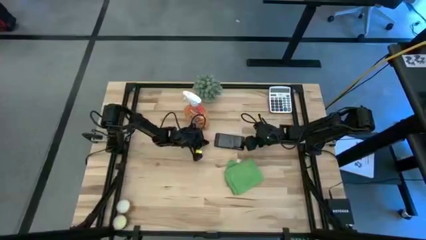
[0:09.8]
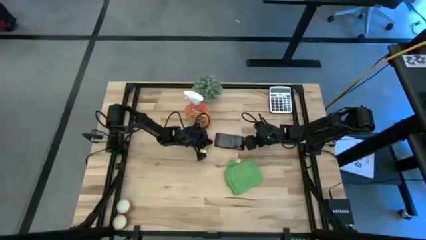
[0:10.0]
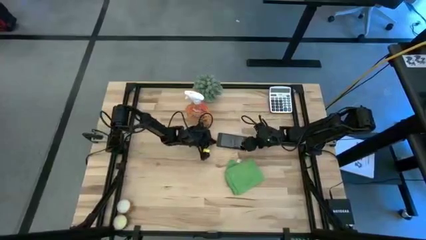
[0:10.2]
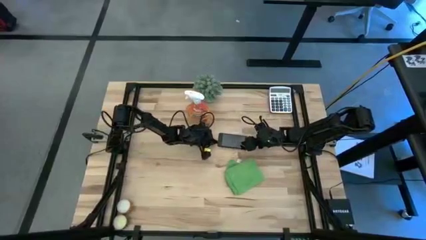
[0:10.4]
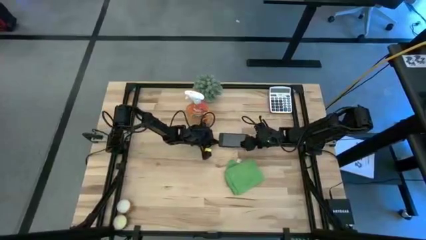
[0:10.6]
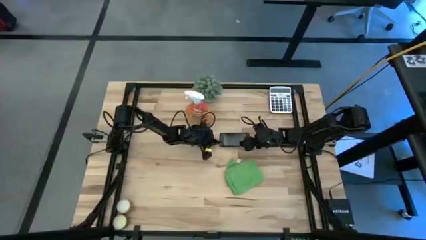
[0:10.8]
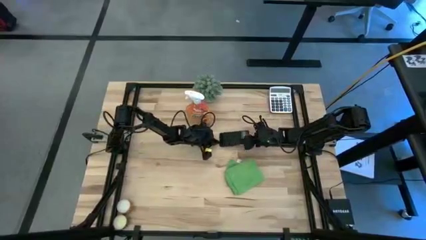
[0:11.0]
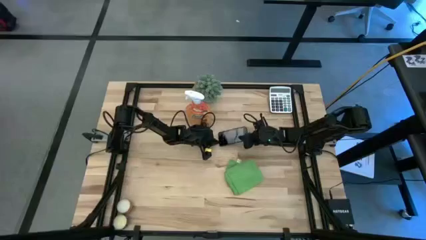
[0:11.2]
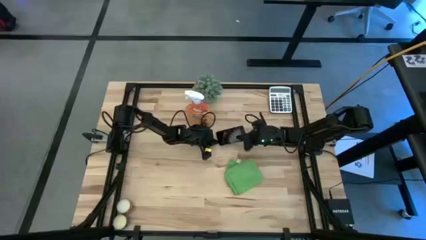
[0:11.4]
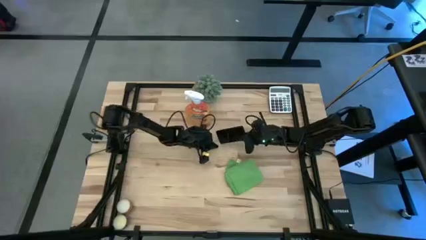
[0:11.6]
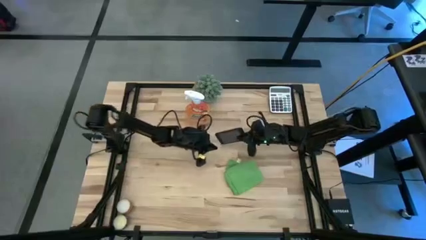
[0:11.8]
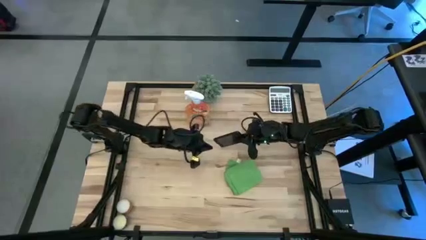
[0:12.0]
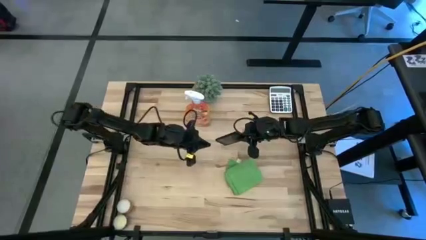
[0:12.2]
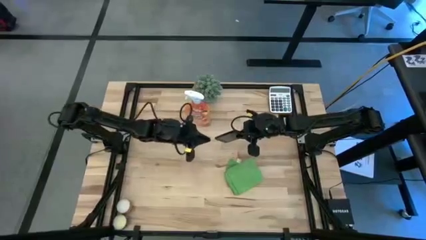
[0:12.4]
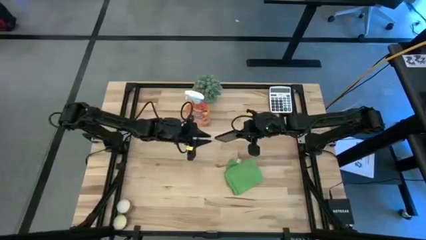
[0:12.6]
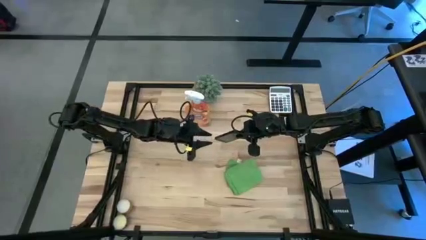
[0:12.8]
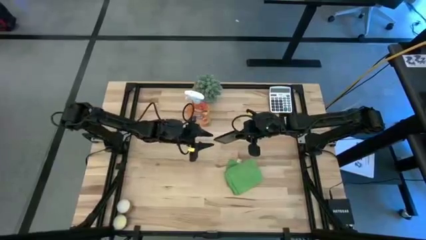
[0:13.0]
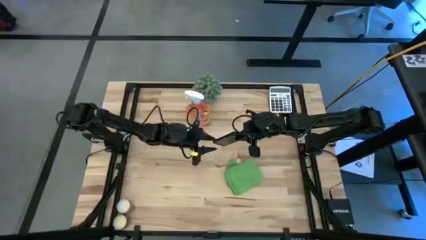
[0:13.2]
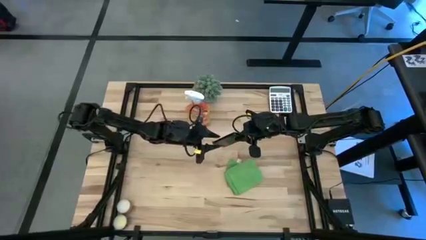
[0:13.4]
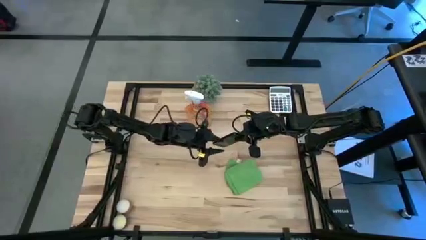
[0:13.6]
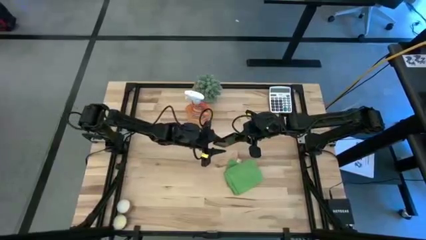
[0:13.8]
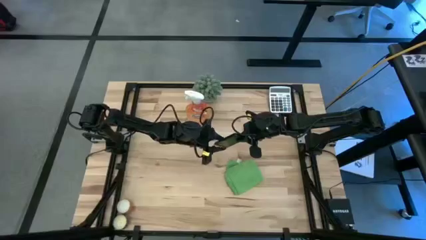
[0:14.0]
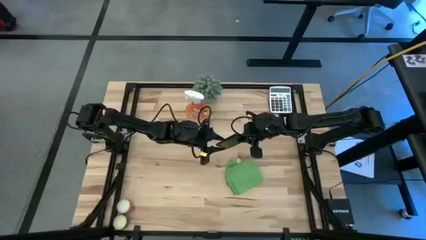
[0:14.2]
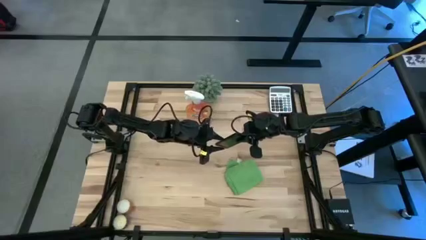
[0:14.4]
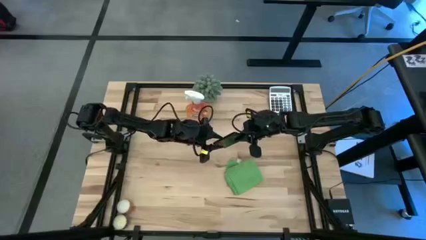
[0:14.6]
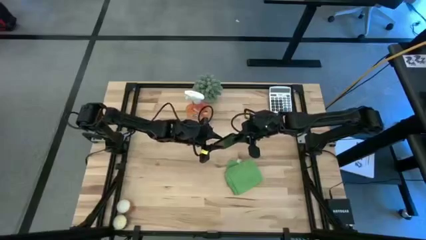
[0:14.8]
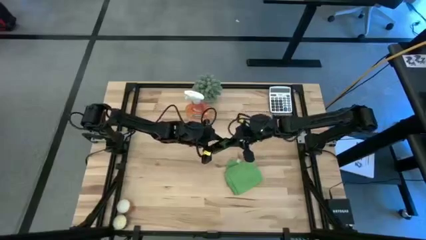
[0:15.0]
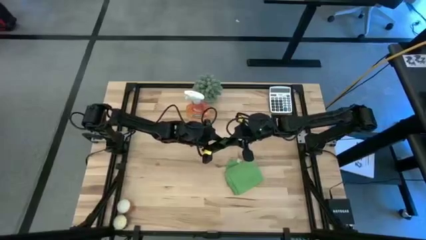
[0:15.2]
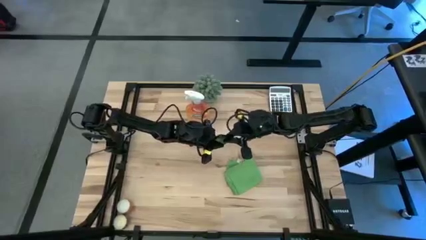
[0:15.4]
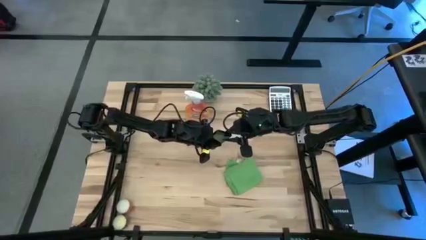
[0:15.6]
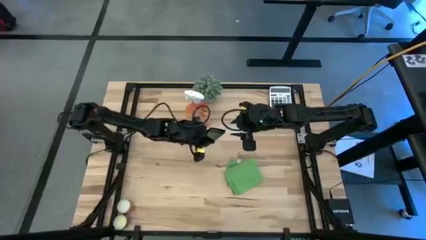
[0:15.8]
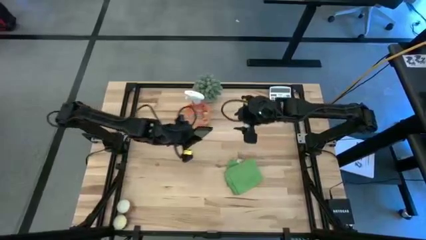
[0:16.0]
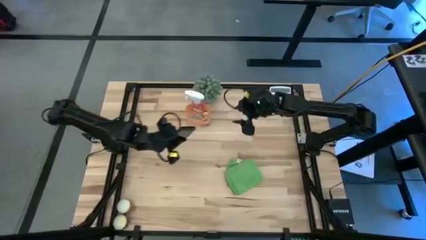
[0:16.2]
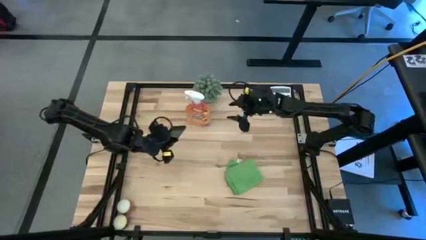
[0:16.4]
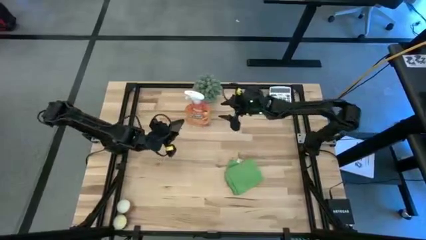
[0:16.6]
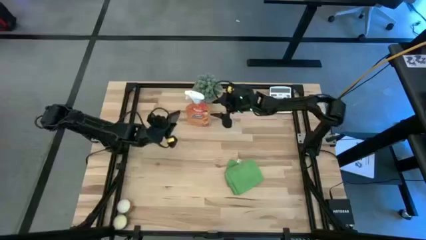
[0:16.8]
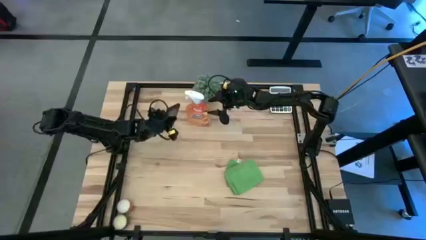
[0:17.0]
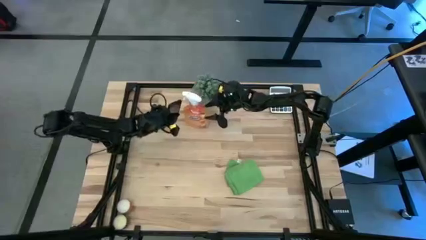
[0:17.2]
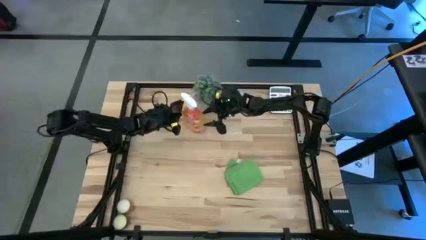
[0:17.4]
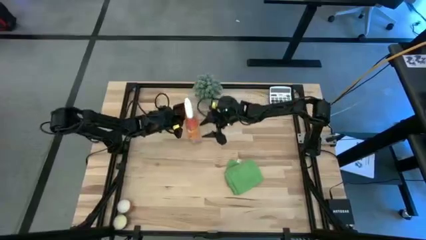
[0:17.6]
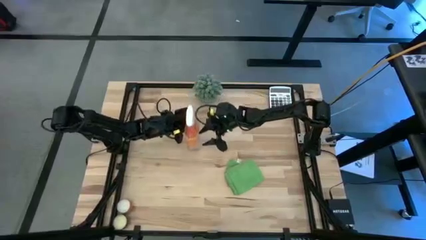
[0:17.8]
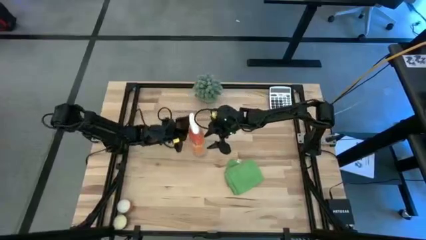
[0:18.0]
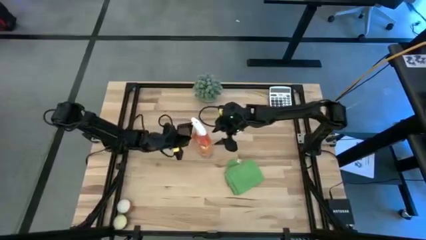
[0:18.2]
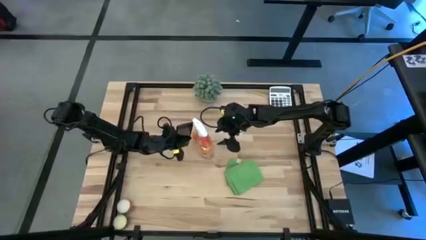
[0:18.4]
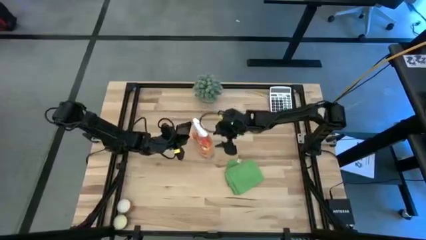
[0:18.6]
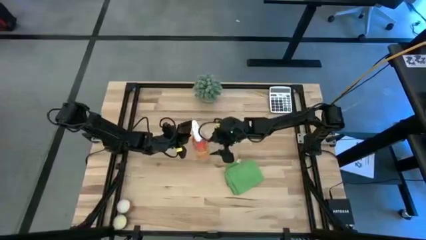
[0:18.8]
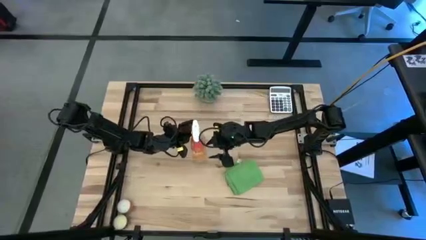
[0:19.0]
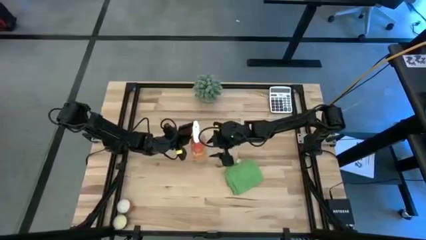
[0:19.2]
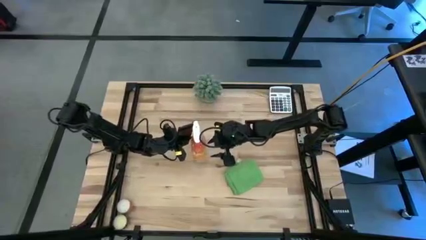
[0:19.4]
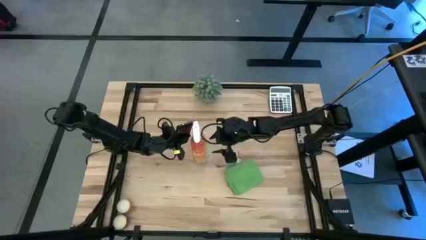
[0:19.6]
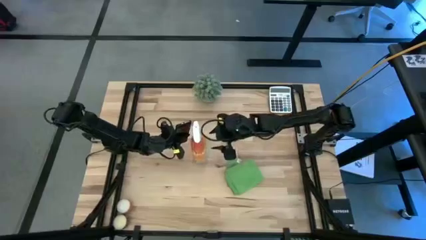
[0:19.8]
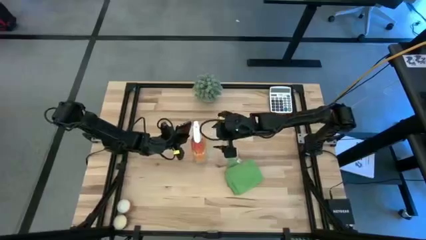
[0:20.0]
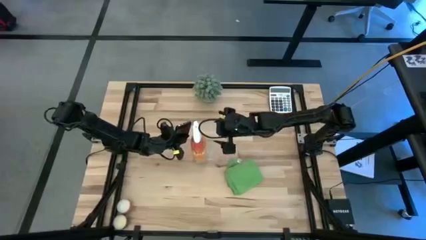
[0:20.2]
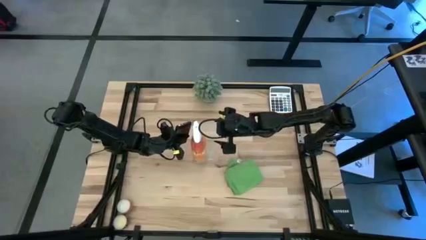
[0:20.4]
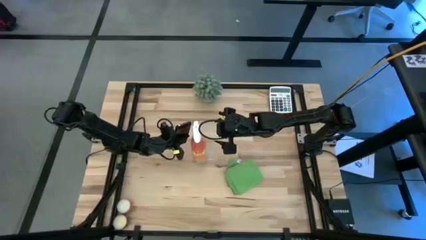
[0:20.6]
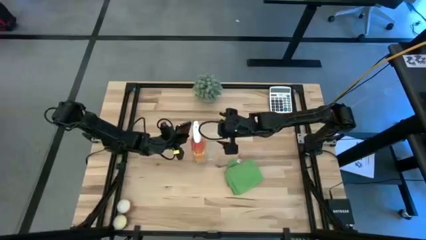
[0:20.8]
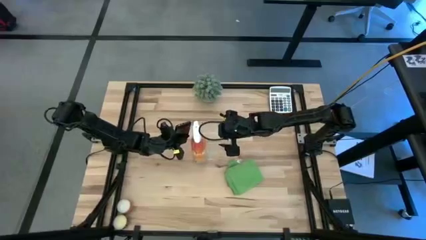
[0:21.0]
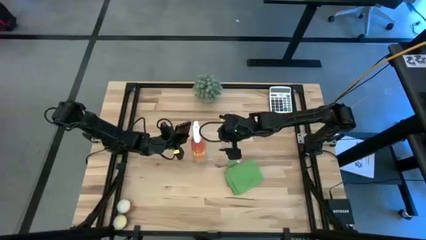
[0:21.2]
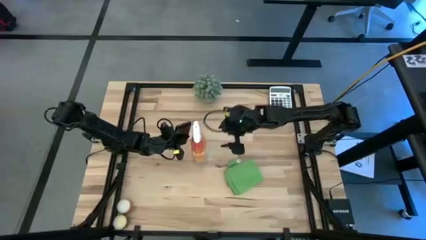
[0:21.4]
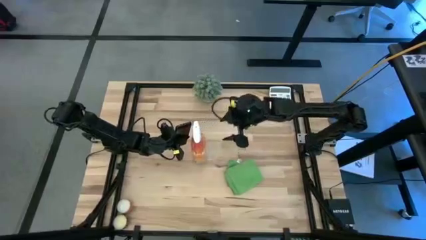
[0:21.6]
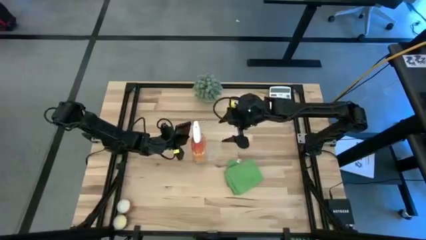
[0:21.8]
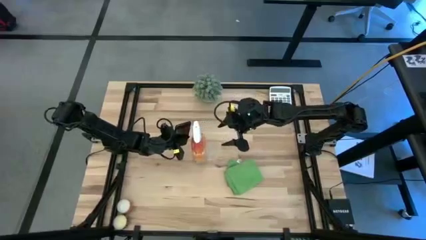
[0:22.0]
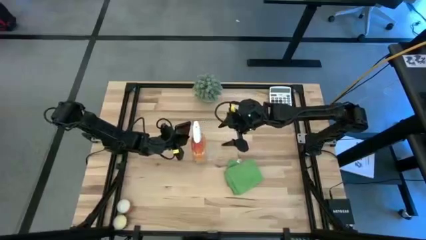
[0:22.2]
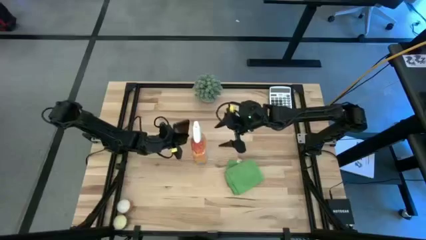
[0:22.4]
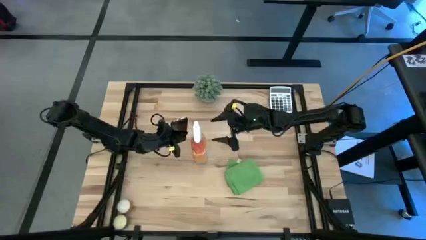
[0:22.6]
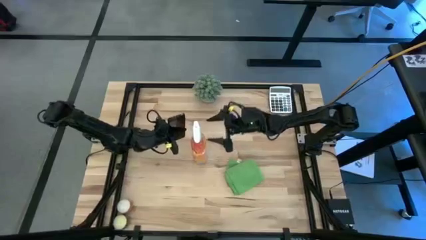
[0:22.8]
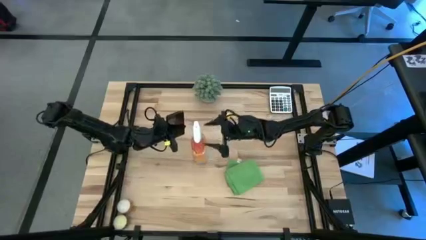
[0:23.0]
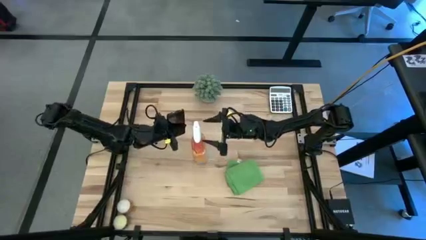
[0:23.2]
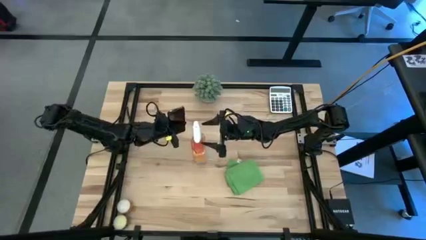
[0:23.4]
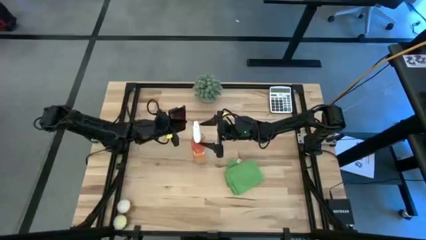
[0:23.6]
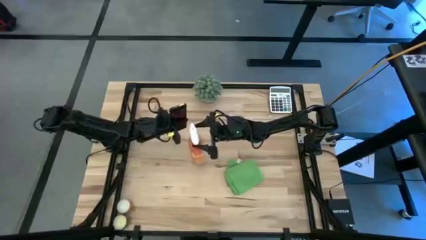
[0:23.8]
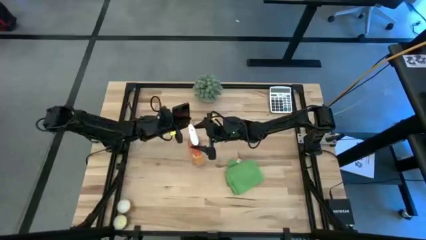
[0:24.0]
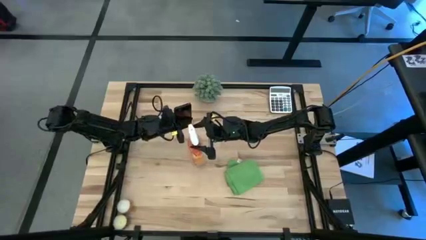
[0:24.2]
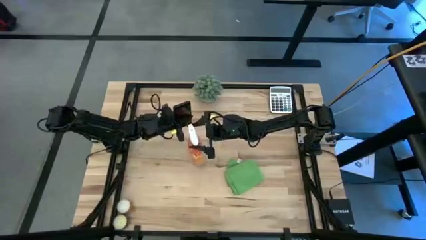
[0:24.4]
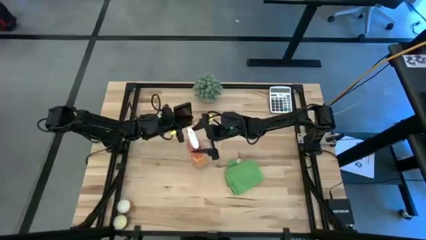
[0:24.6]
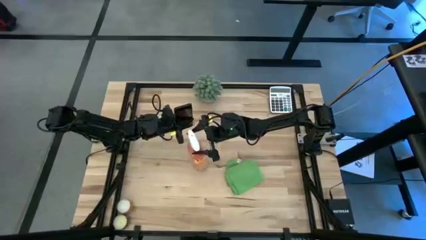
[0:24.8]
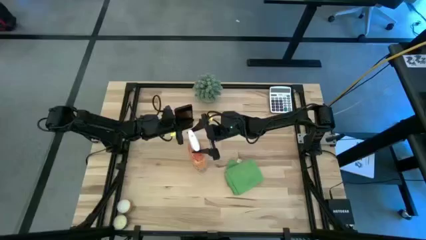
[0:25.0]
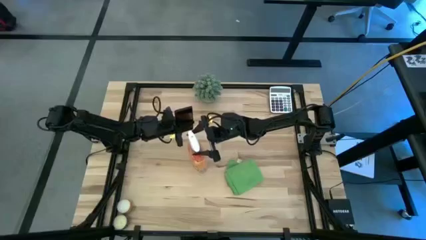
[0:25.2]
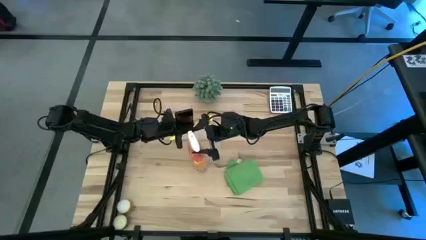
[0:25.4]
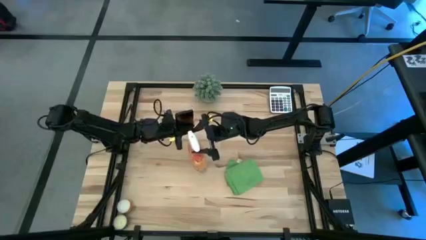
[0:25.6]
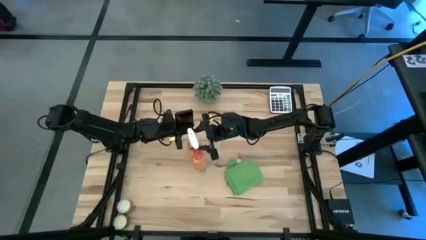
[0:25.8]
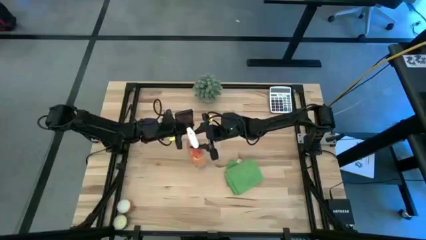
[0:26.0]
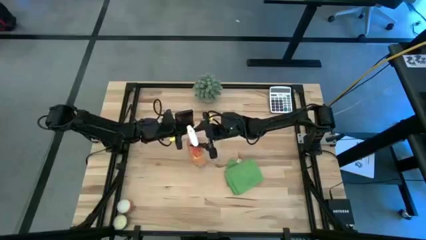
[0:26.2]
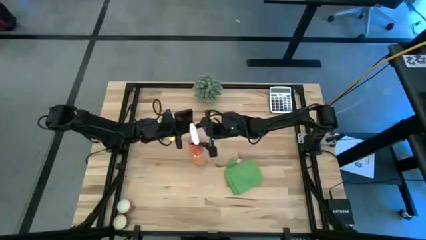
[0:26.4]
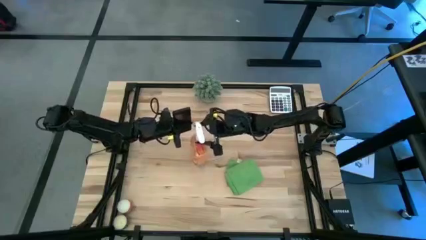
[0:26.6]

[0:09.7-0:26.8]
Task: Apply microfiber cloth
Spray the front of the black cellphone with the orange spray cleaning bottle
